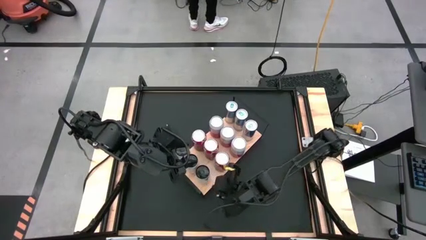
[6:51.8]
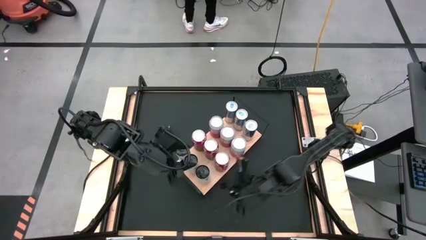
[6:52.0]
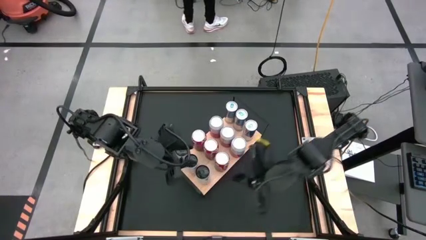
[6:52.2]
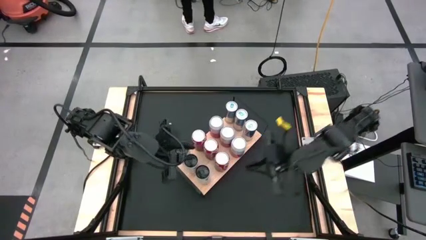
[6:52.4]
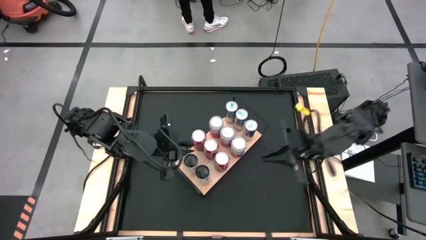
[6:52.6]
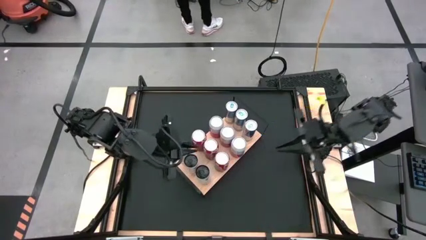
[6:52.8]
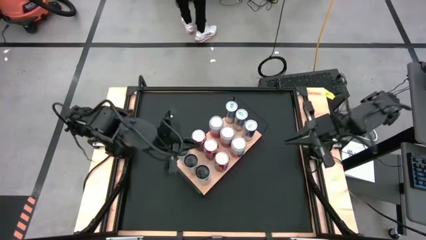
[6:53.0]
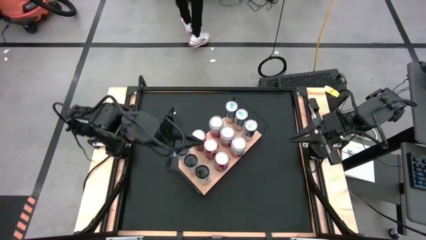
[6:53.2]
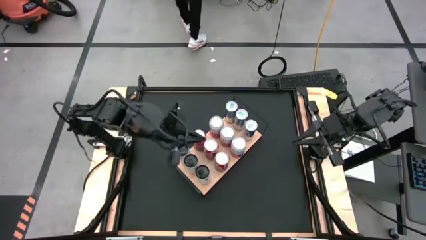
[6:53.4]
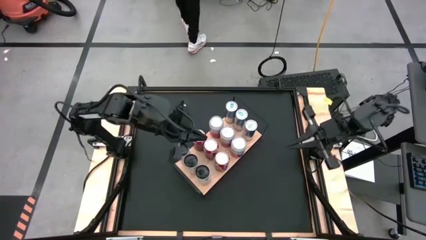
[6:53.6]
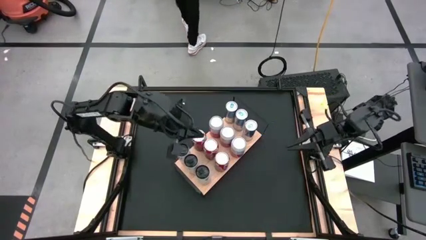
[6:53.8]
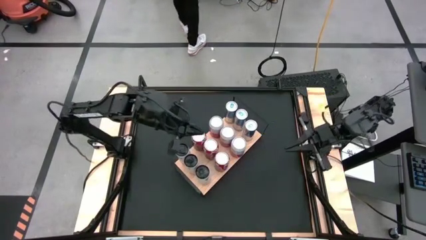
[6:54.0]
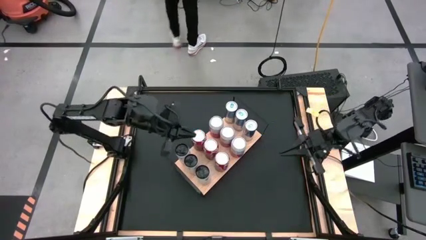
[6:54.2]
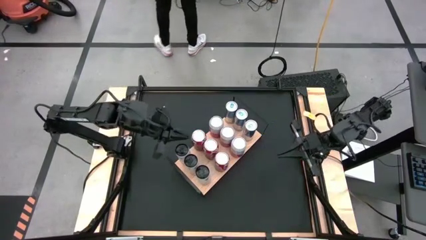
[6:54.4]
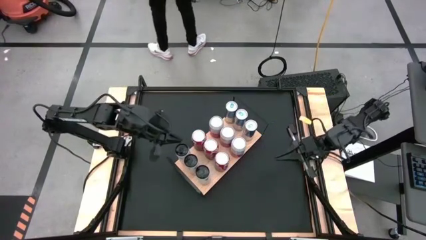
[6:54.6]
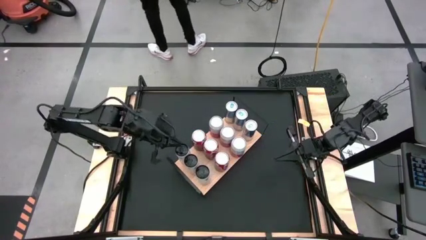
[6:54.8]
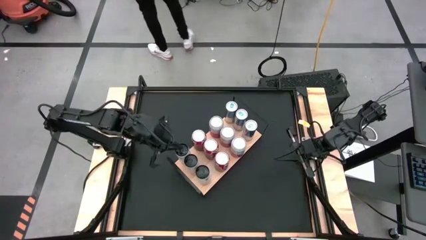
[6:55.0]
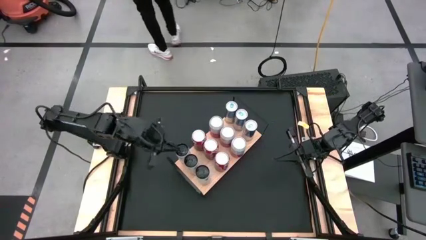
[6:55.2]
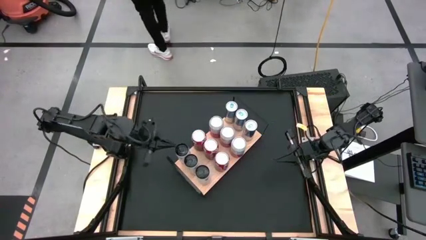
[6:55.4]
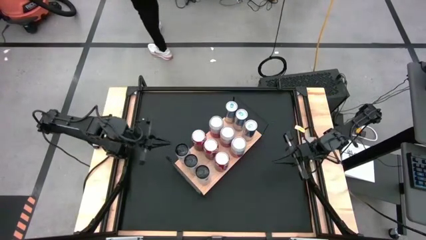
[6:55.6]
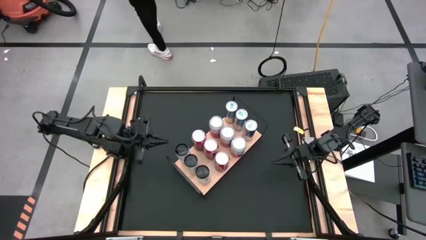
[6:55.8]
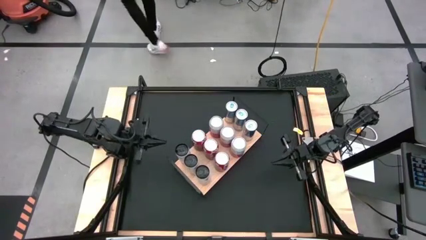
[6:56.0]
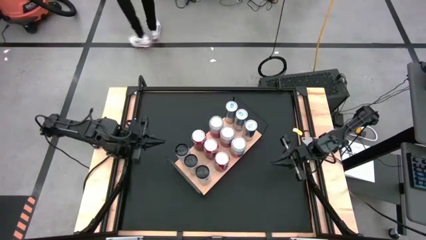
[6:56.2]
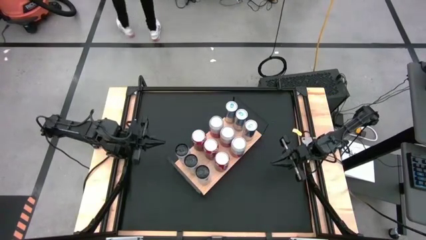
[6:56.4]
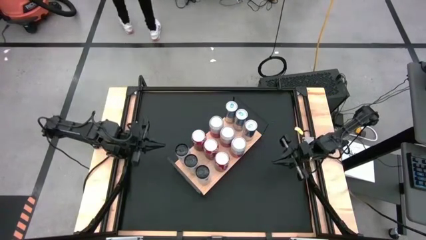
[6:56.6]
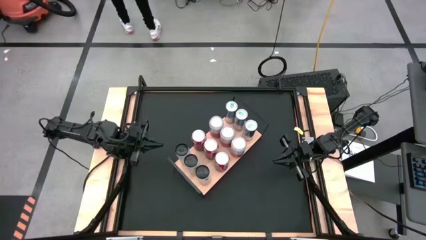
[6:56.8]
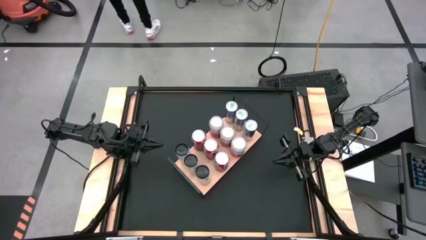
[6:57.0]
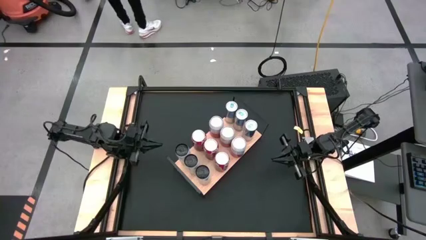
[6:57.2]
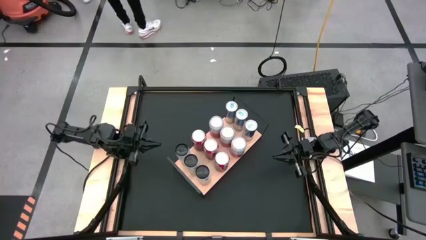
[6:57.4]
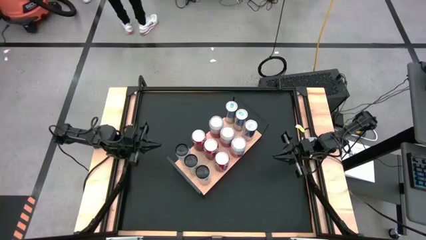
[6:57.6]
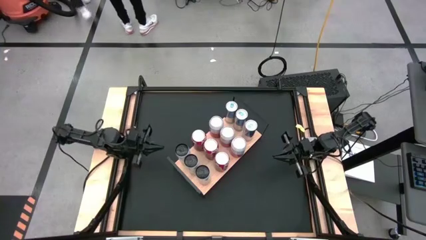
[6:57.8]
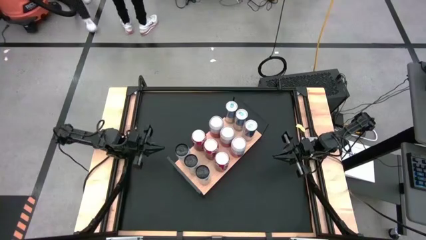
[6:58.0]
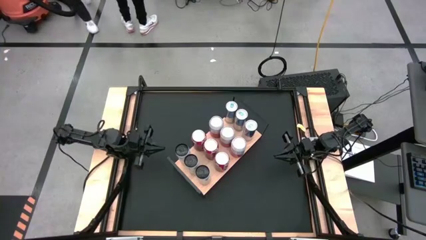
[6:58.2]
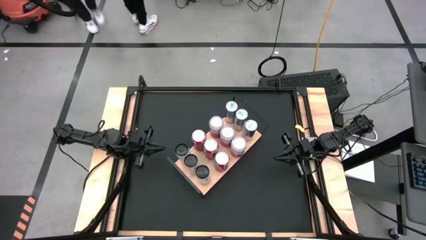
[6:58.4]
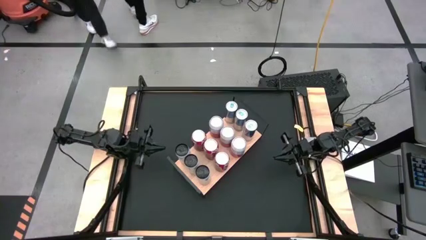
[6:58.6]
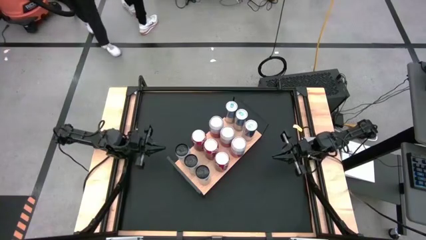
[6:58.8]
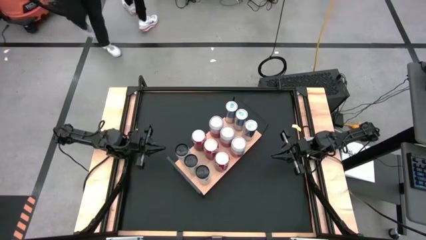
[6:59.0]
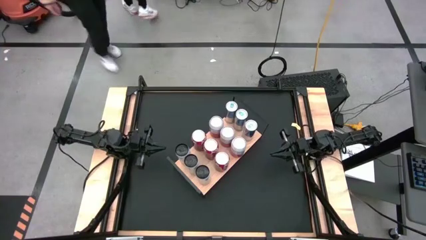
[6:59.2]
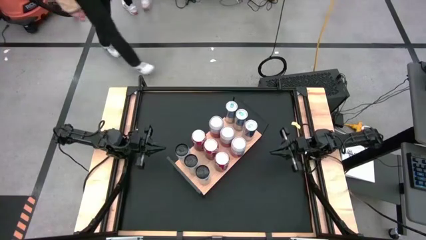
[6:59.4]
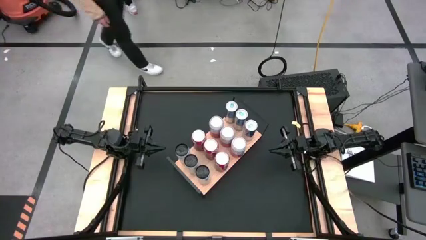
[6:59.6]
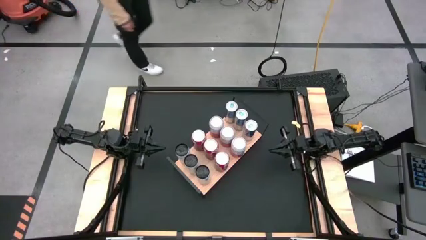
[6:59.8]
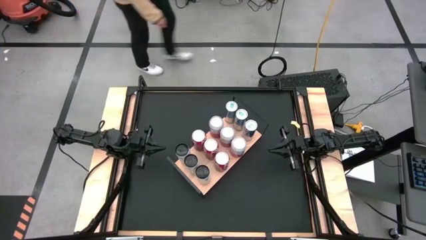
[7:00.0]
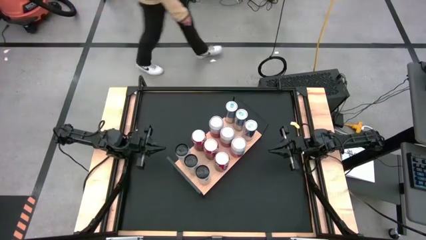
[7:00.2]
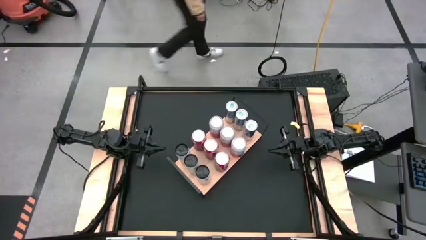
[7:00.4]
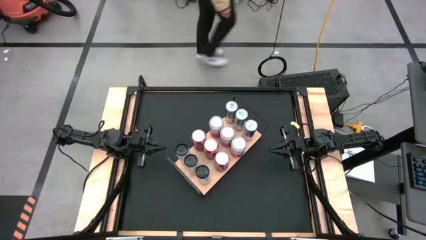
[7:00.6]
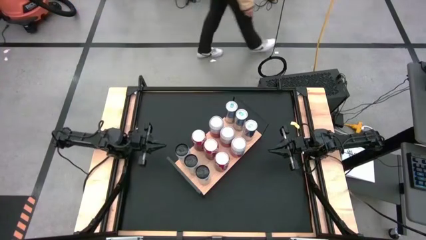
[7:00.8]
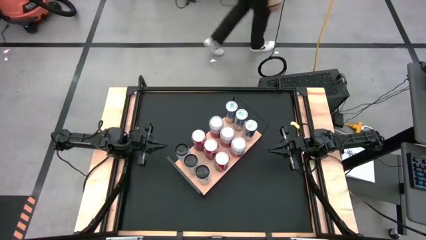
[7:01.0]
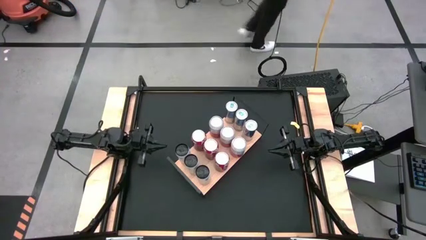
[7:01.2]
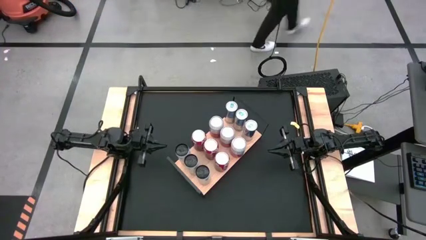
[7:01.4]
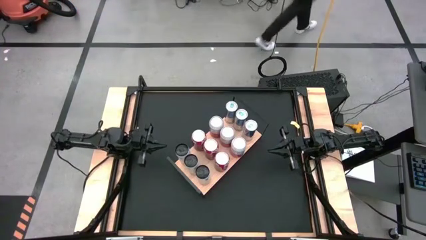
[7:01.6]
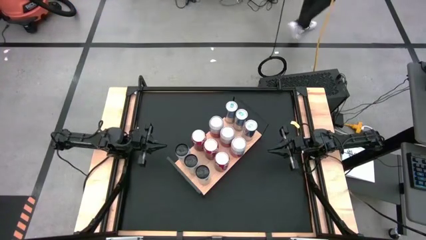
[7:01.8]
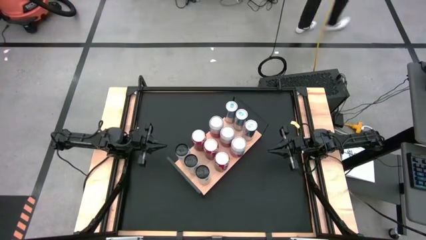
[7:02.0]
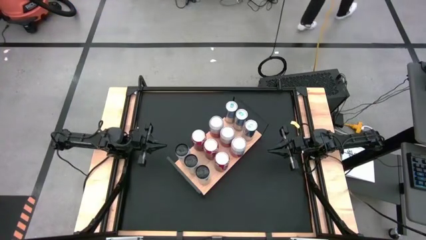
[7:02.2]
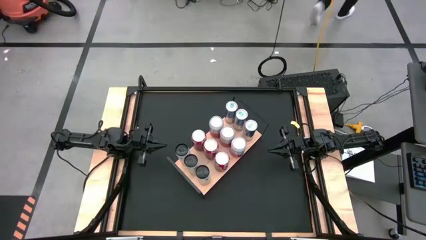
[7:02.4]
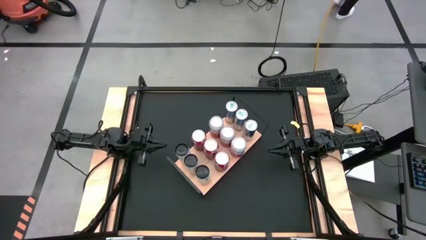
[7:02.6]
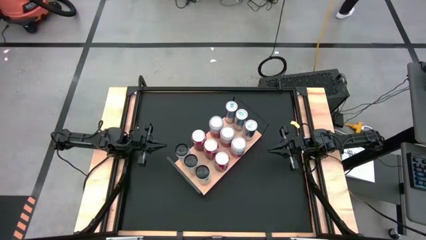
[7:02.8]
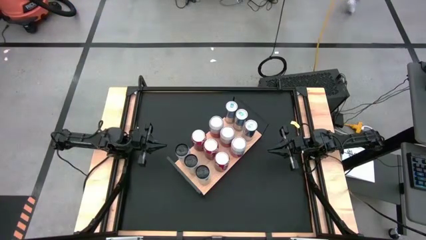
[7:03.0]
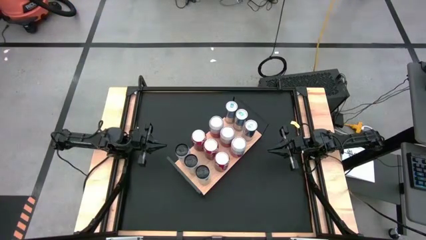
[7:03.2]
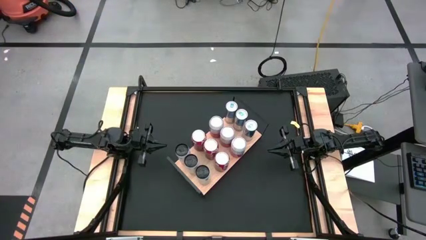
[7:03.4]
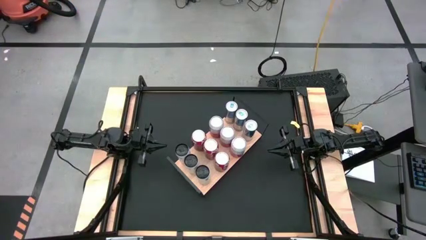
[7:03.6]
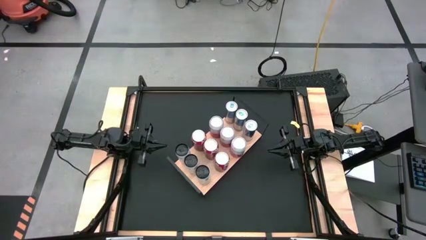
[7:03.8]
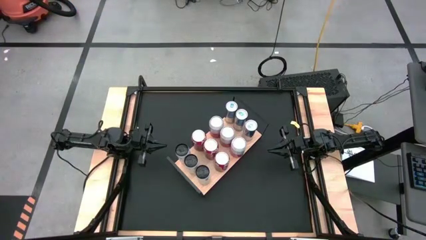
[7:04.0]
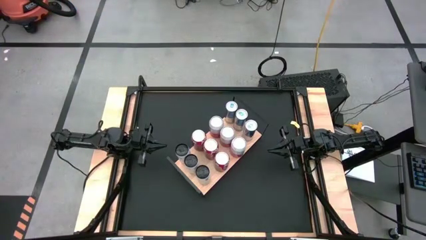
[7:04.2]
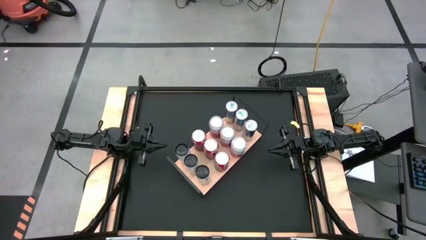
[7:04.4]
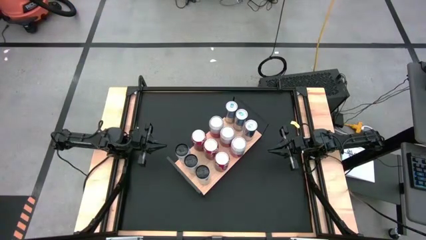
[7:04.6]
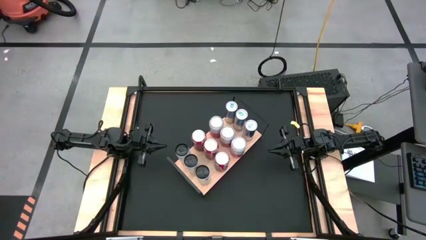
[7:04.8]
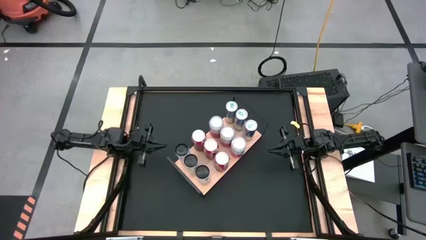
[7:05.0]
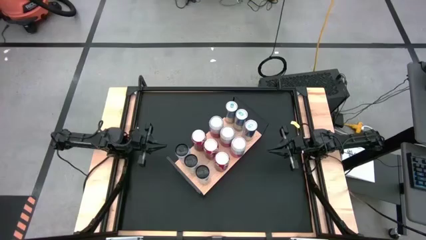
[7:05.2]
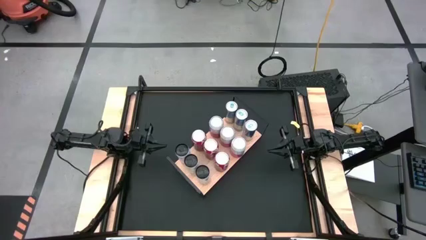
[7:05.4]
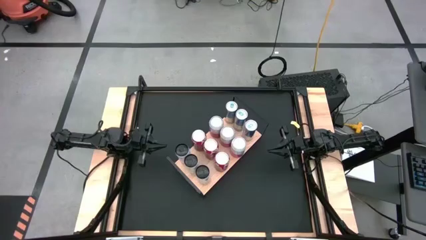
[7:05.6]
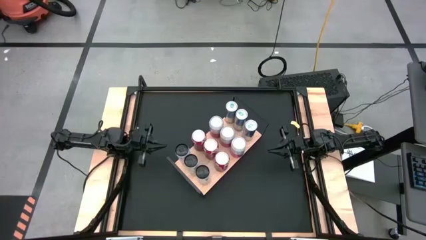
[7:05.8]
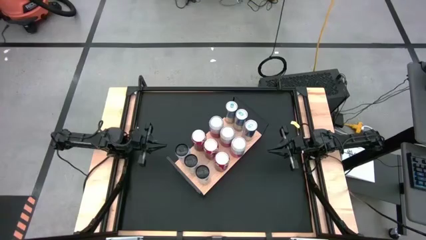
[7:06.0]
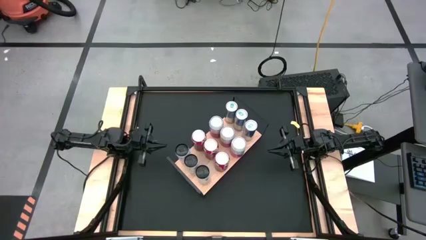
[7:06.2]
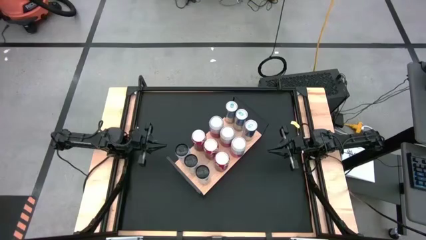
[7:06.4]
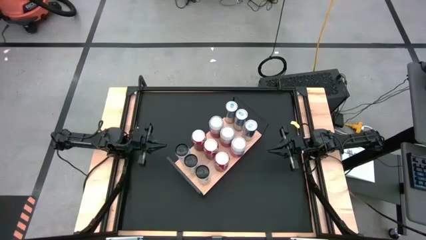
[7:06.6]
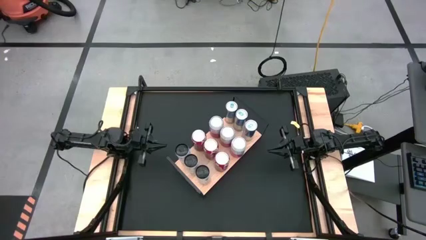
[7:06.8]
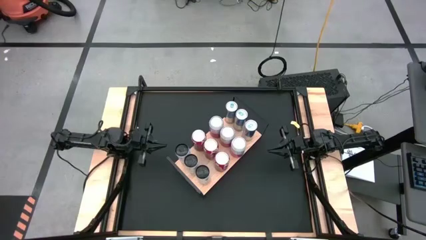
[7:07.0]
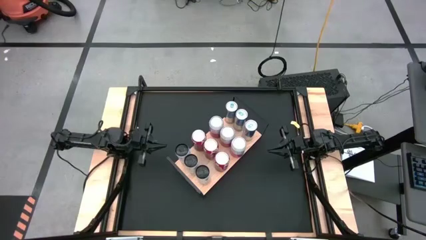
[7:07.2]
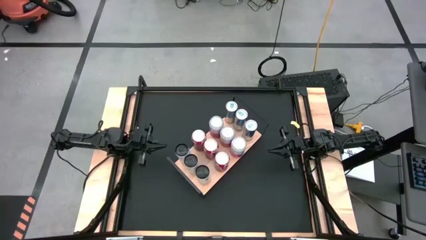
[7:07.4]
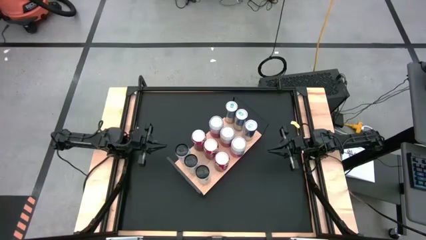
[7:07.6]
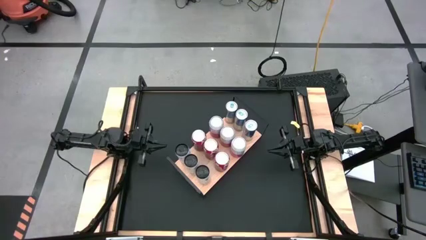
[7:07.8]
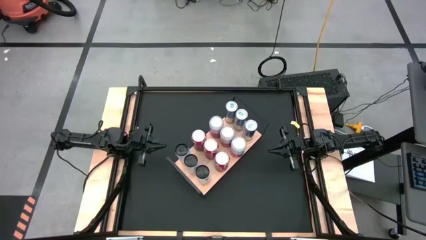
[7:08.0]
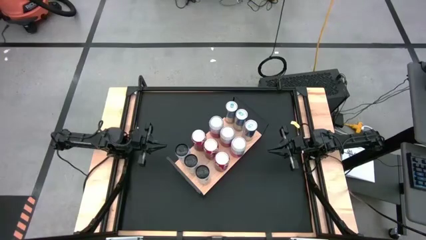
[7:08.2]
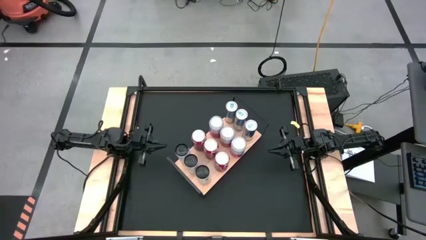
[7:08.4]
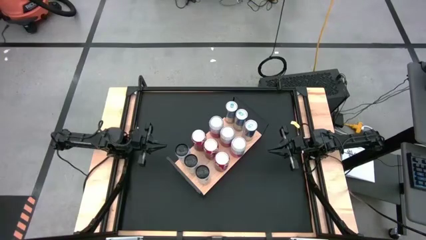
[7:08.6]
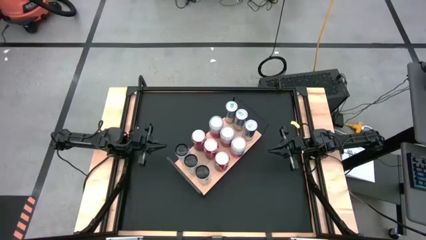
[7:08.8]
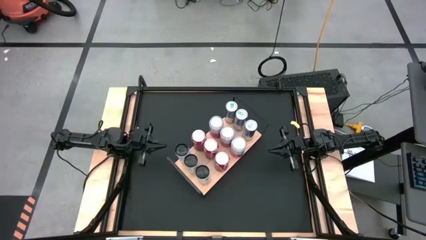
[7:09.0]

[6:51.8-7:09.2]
Task: Place canned beverage on shelf
Return to Home Position
